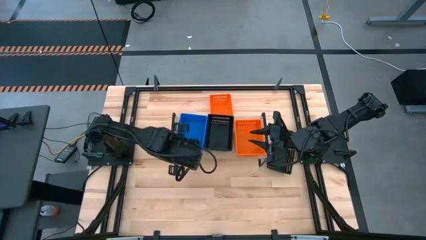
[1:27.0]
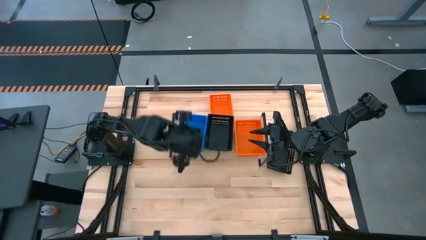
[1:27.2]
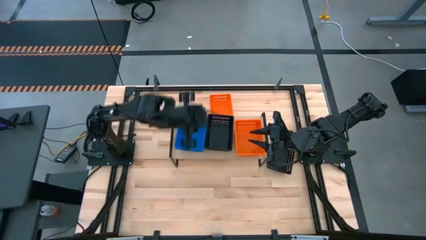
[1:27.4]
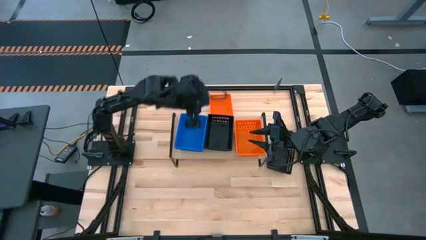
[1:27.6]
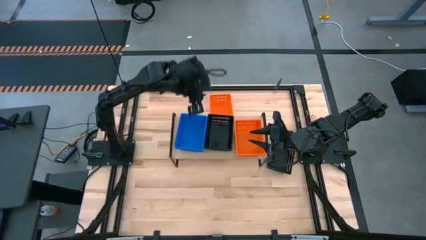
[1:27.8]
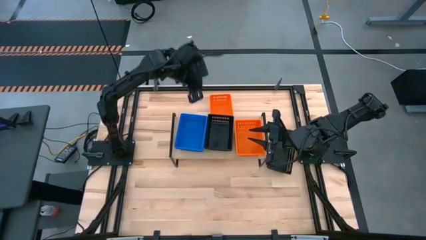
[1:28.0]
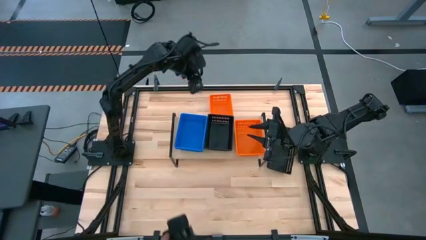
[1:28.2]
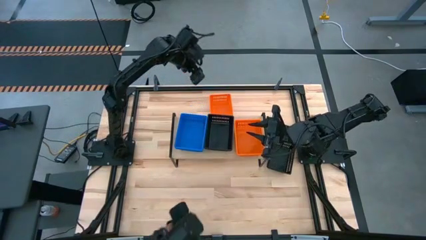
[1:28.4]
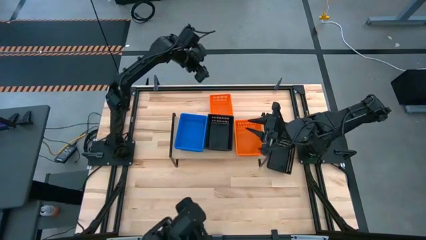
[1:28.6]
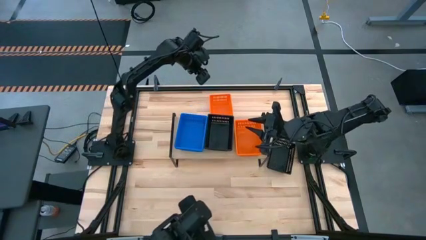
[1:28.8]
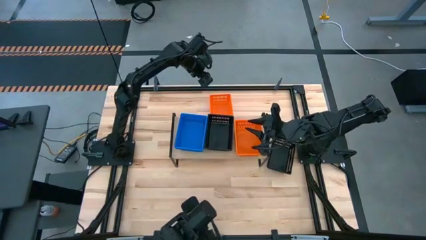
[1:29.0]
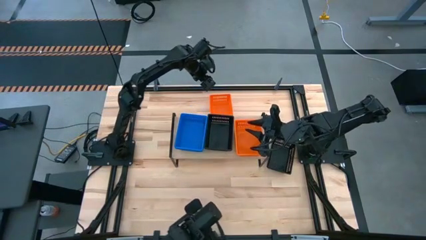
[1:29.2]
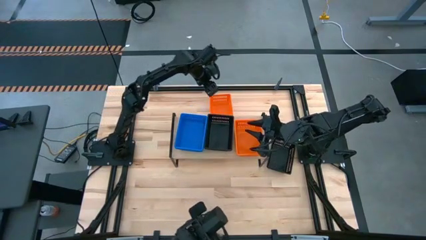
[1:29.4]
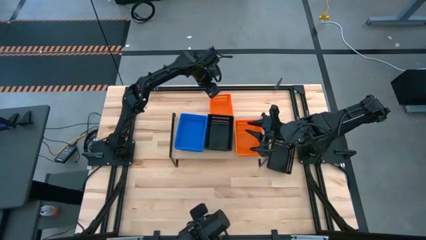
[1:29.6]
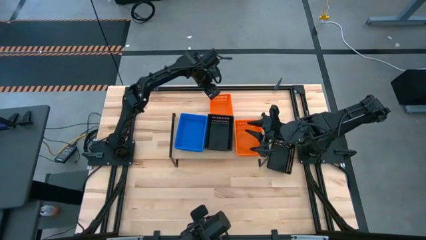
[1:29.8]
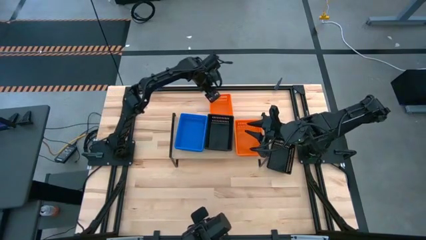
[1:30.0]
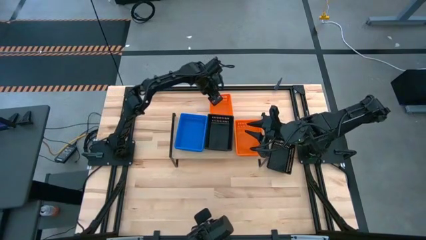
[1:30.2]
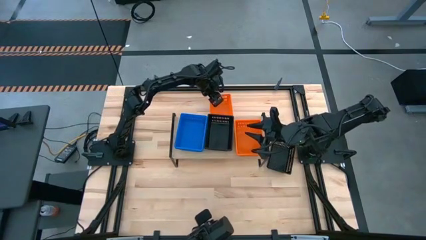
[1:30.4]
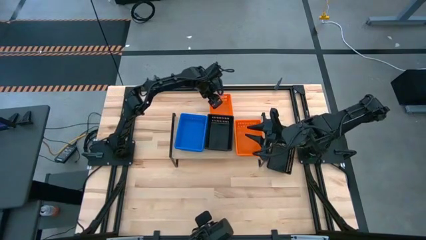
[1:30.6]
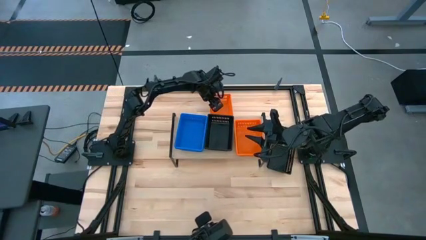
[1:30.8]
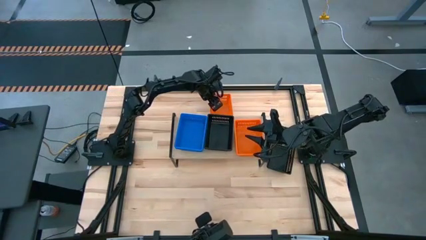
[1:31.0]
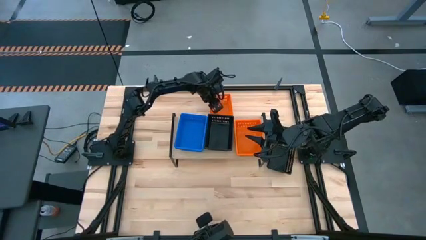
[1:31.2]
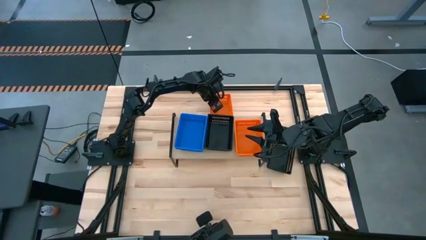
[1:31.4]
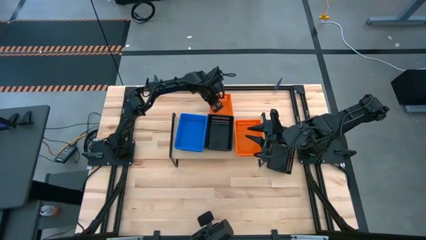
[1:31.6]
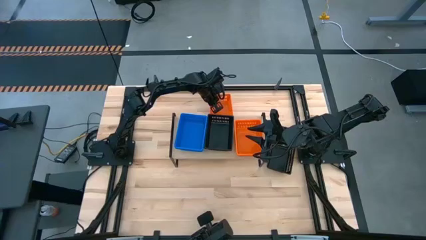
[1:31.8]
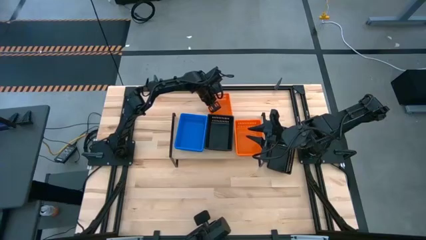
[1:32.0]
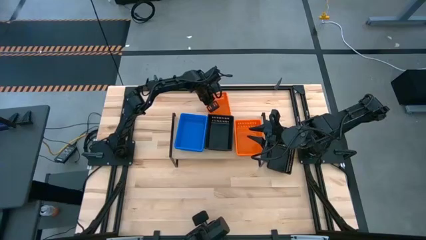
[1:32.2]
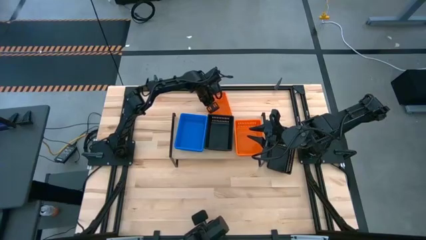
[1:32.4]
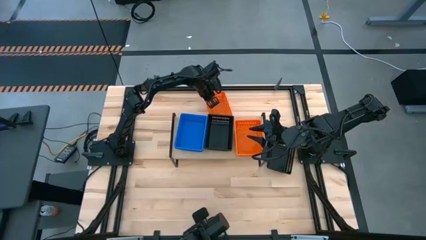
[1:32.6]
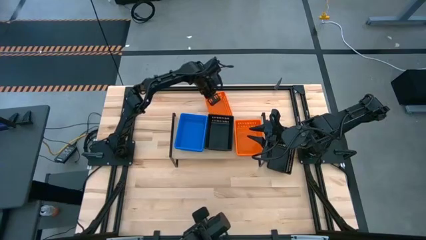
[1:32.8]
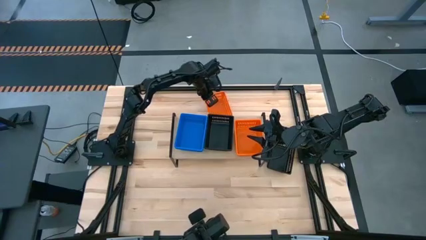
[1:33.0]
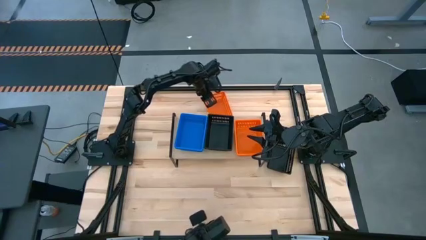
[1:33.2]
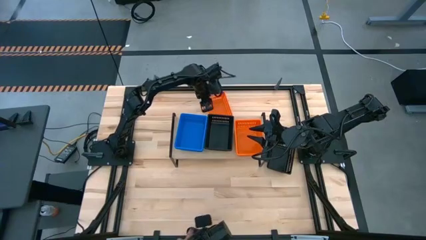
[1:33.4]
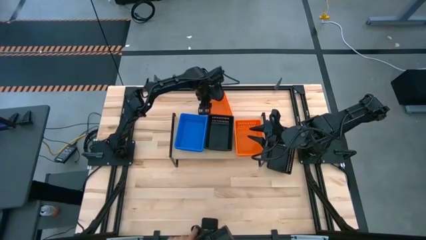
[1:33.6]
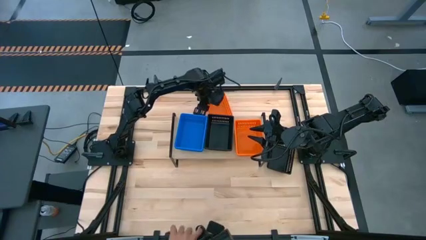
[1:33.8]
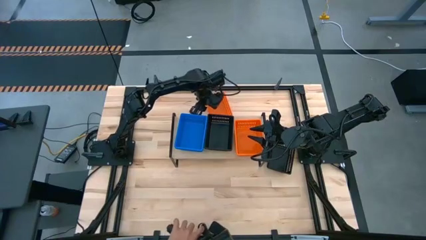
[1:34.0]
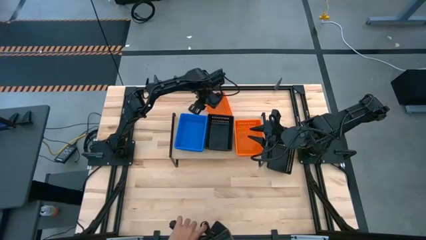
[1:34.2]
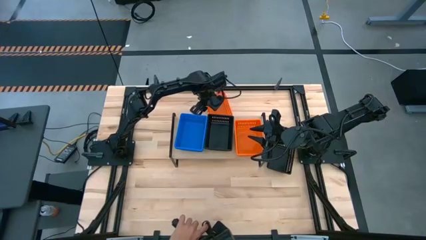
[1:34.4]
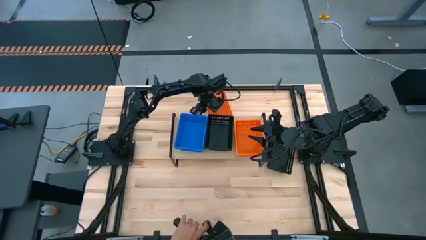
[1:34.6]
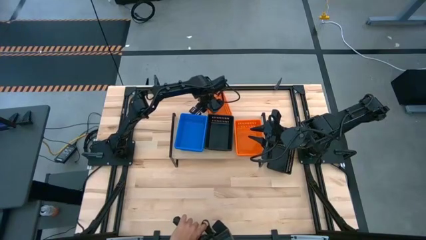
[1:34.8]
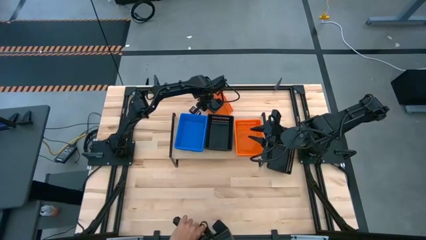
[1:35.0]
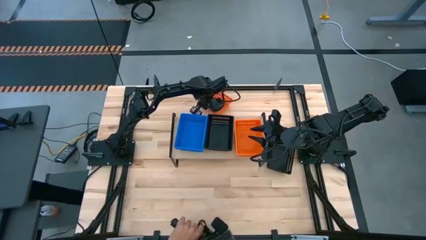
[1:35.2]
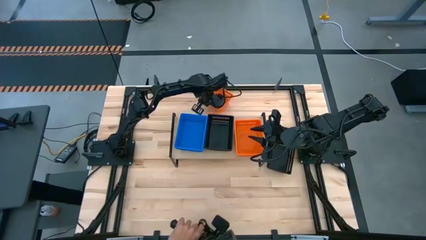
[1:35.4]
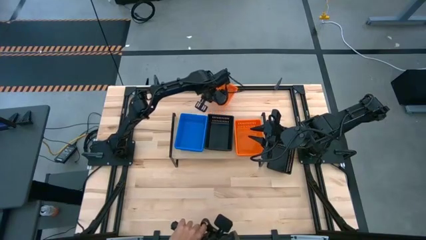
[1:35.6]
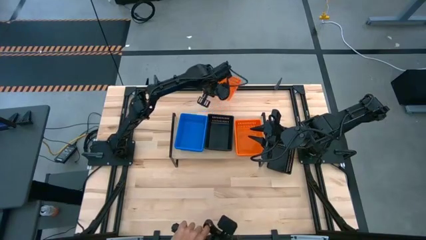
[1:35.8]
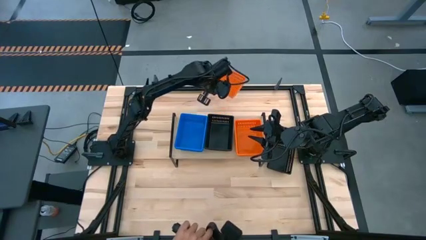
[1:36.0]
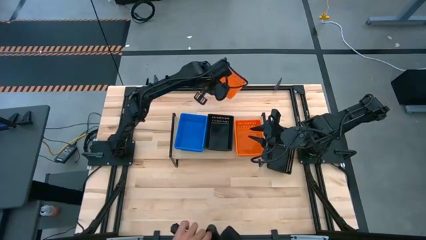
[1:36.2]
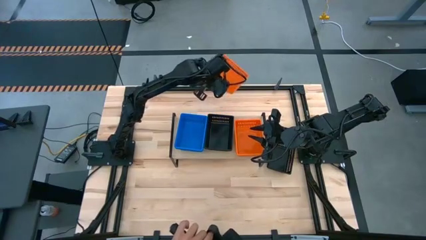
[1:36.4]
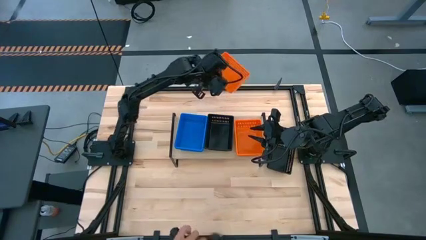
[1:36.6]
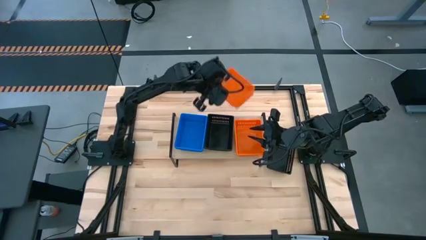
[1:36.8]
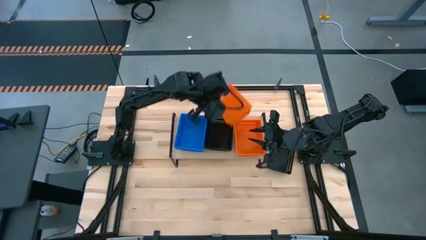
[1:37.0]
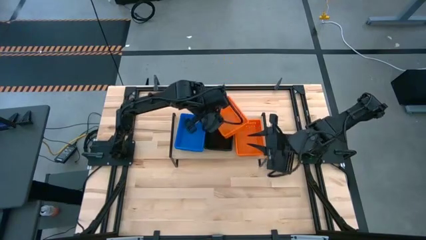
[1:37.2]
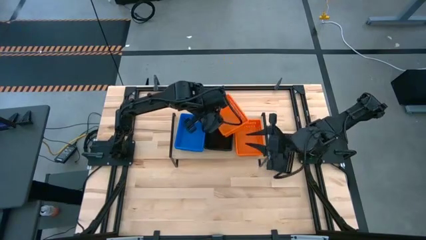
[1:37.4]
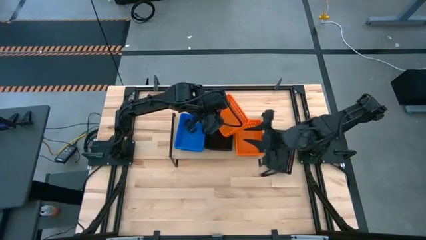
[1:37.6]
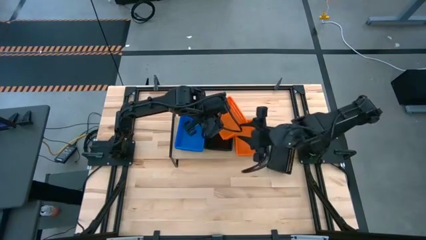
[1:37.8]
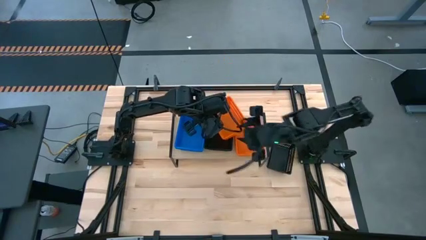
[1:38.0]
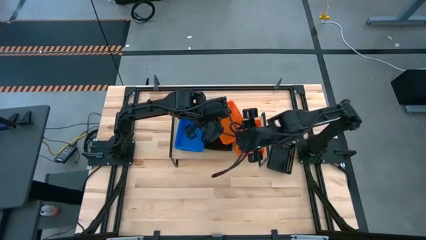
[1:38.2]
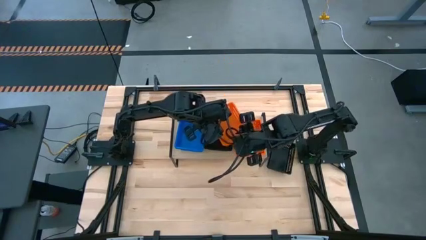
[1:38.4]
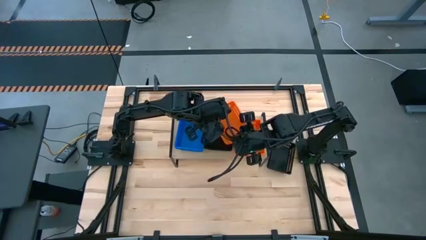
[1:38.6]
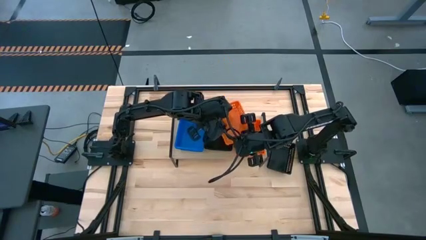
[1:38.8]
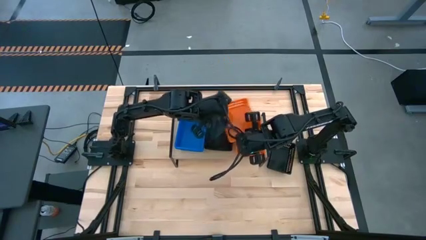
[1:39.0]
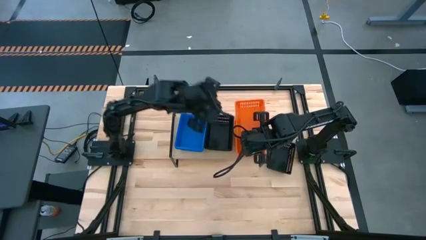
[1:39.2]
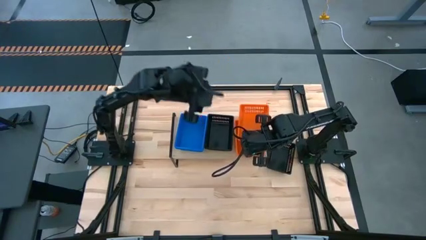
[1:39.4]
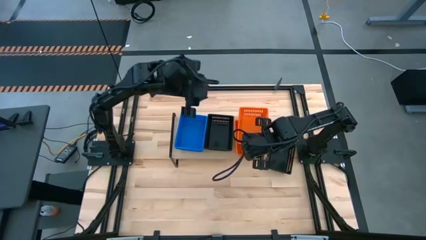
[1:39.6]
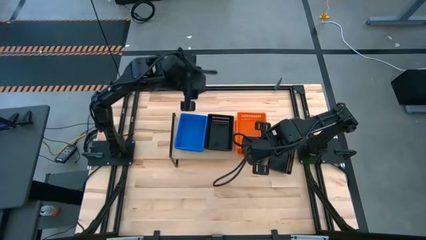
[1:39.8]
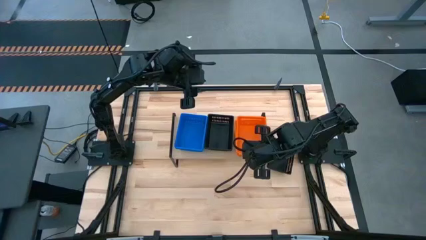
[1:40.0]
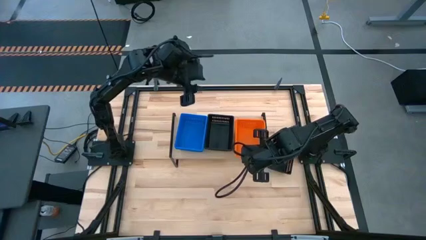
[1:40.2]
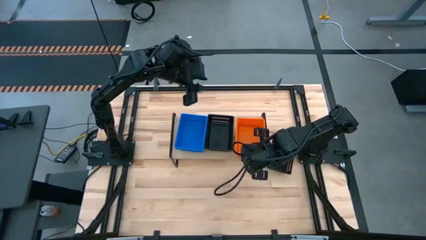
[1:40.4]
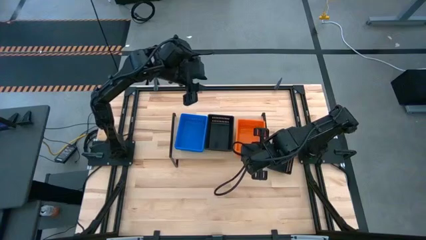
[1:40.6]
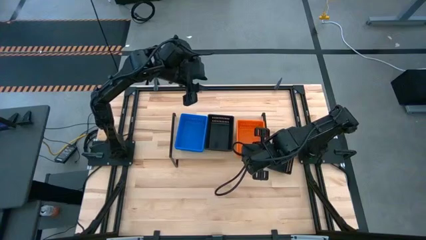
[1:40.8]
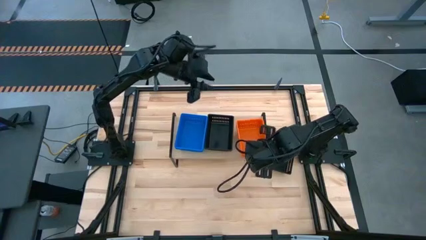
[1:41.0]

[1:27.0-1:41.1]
Task: Stack baskets on shelf by color
Stack the orange basket on the stacked orange baskets on the shelf
